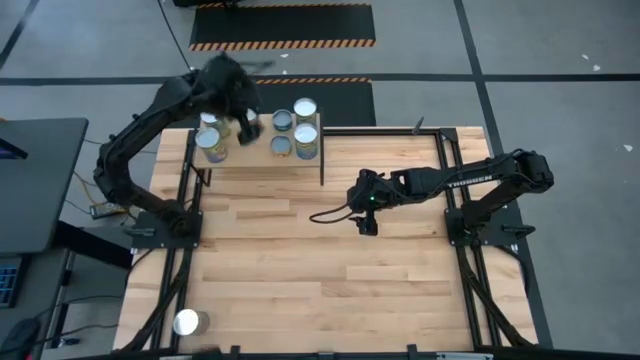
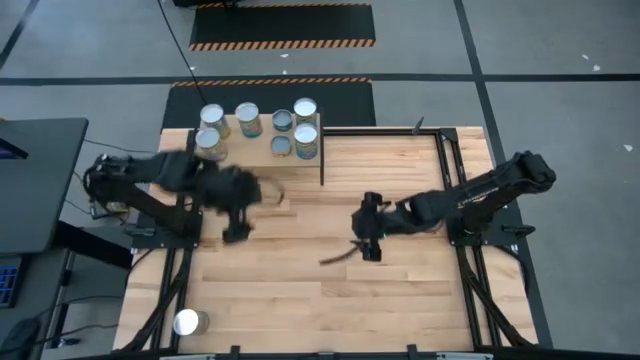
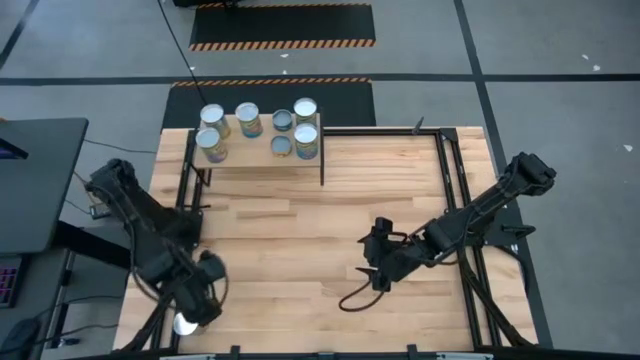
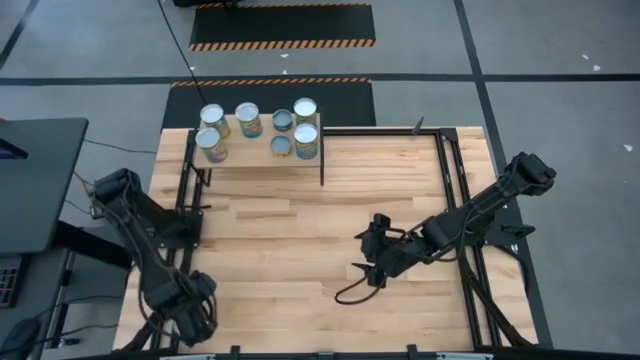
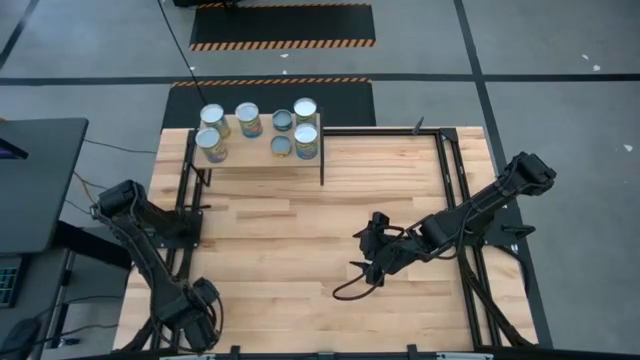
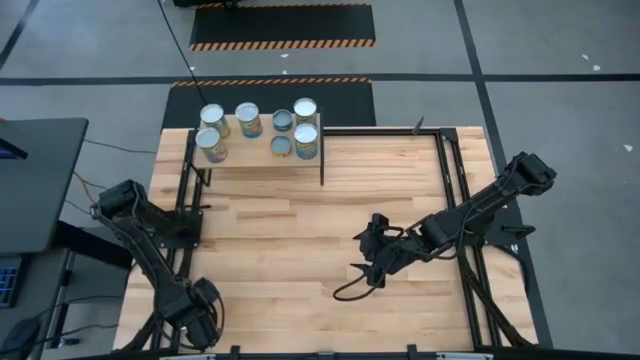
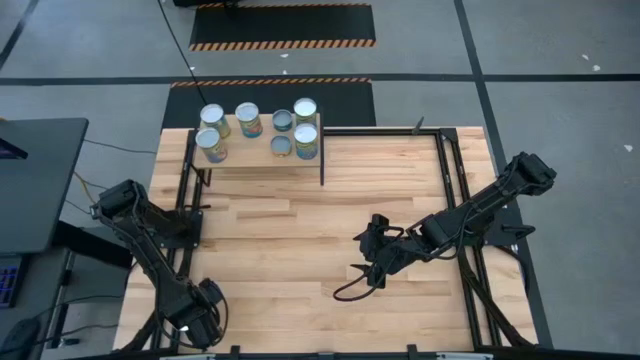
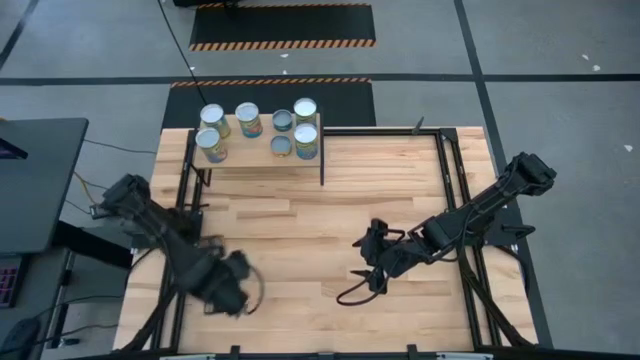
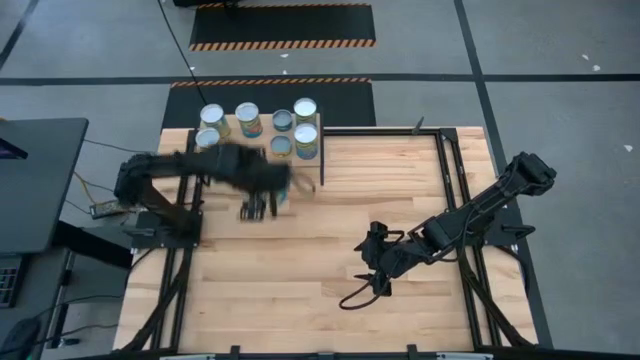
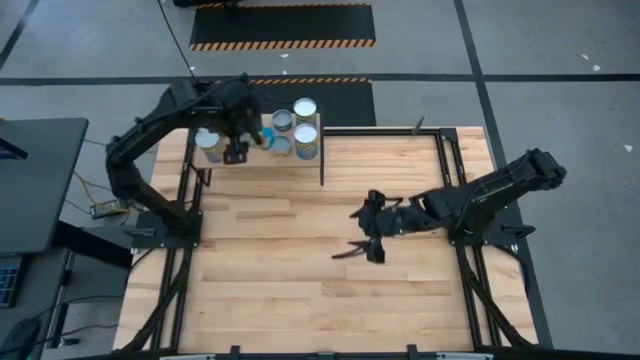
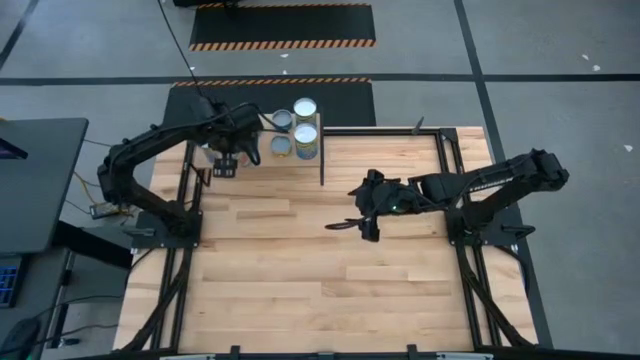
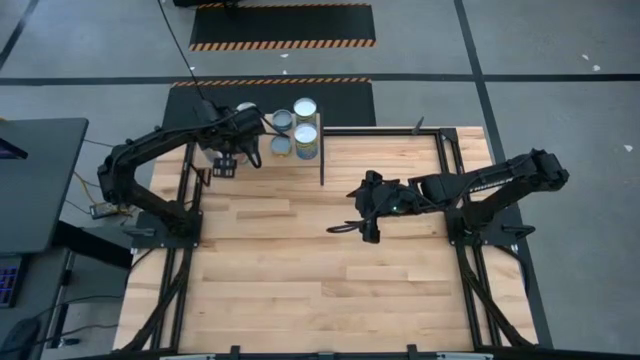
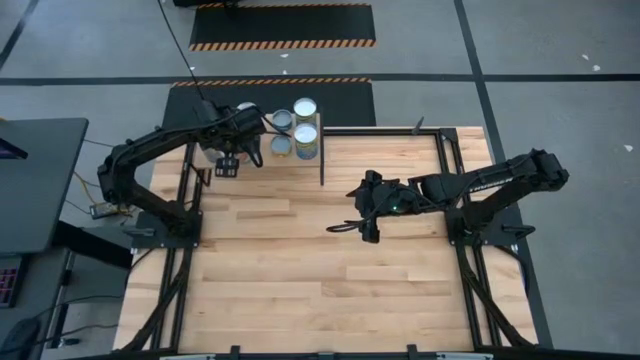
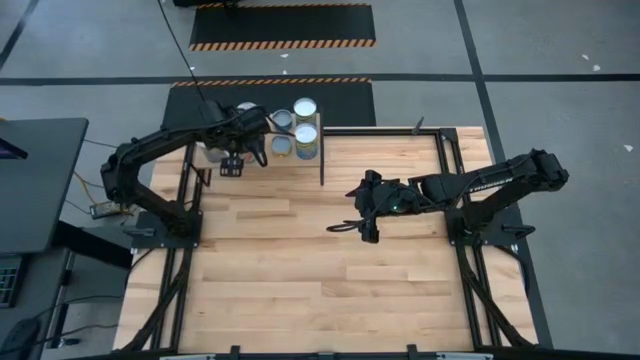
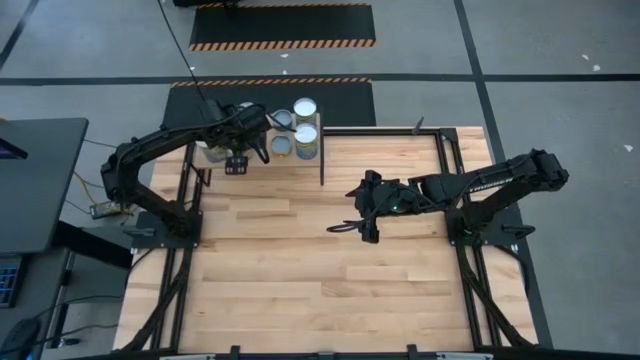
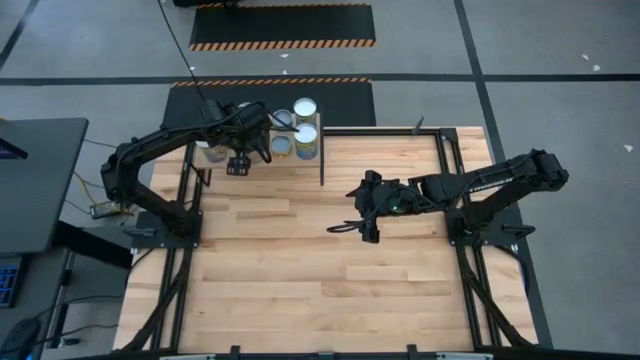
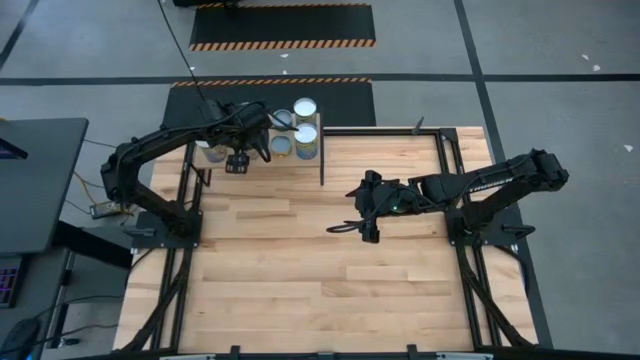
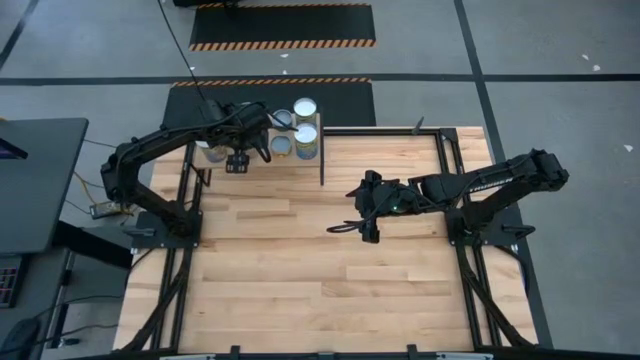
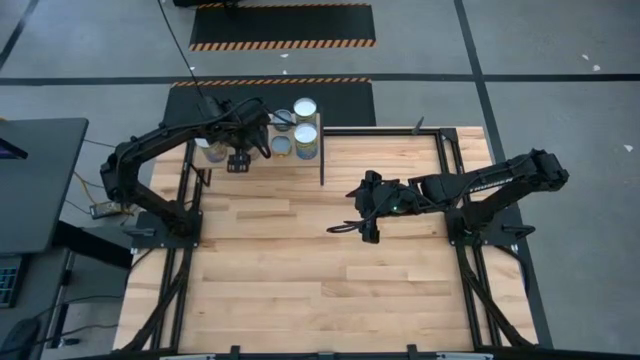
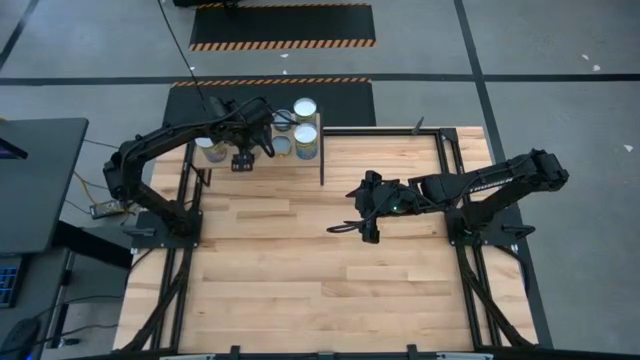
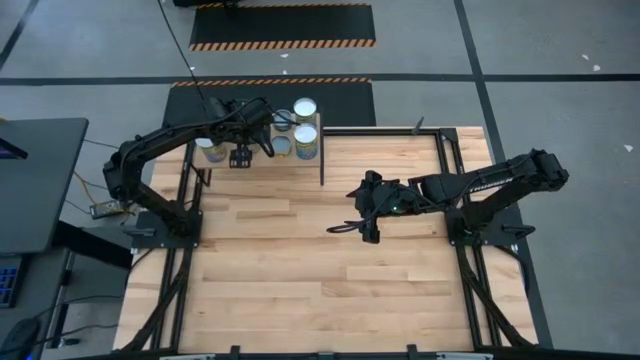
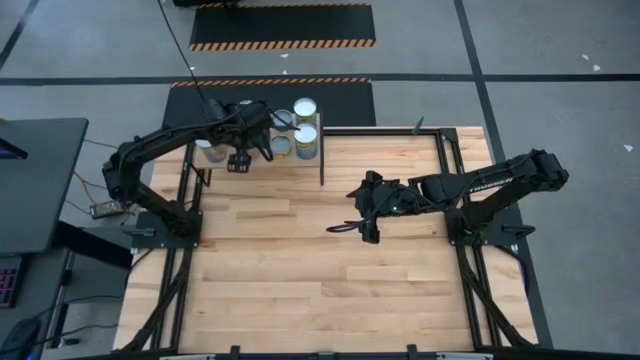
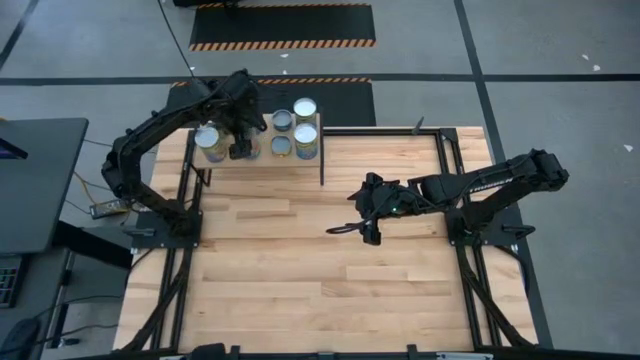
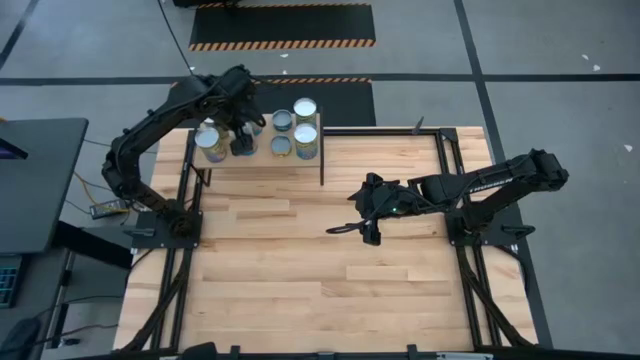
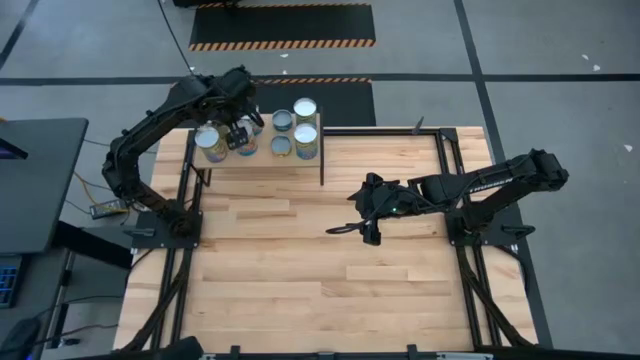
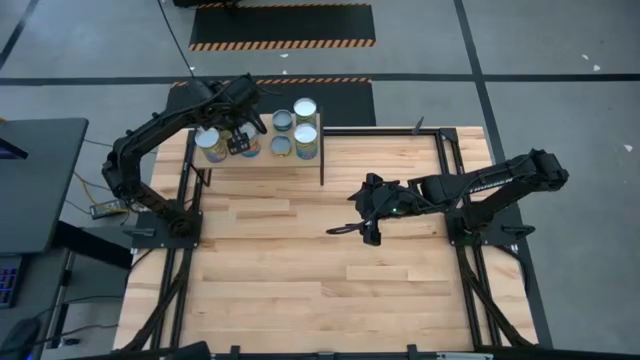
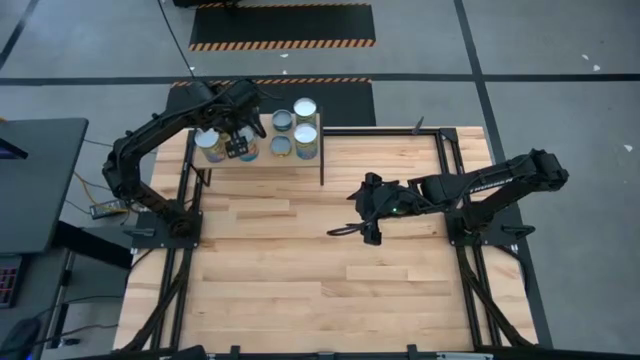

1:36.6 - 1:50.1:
Task: Pick and place cans onto a shelf
Put the canned tomatoes aligned with the other canned tomatoes on the shelf

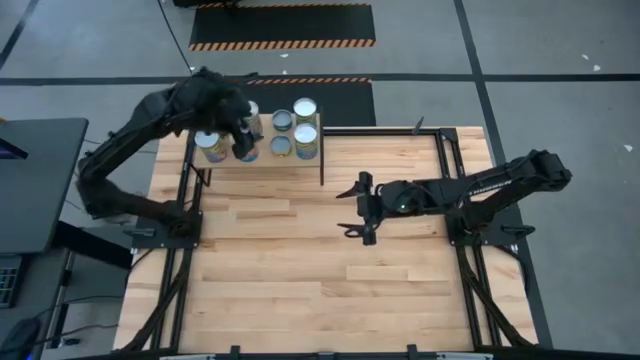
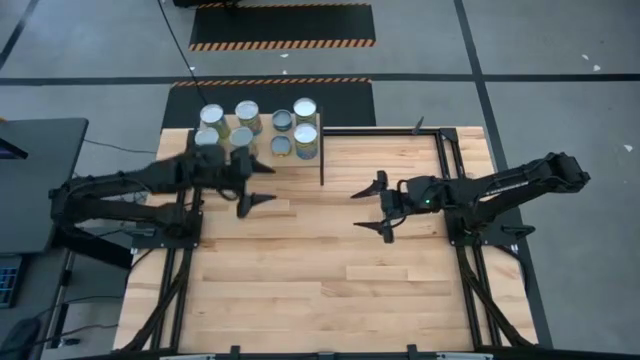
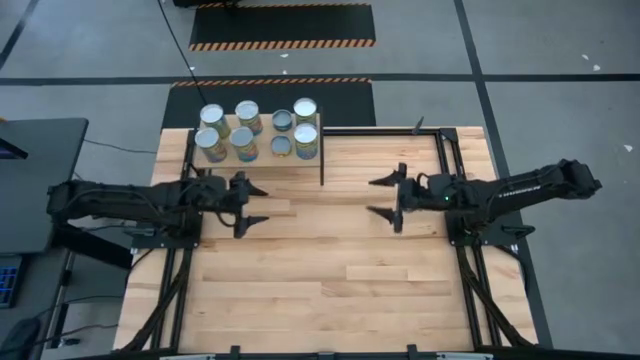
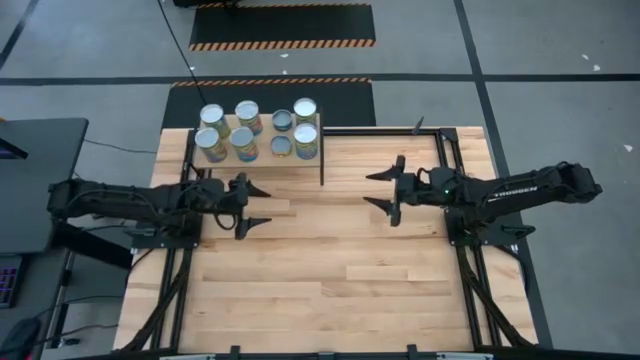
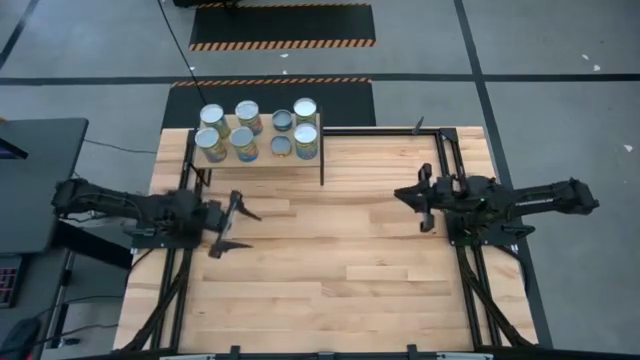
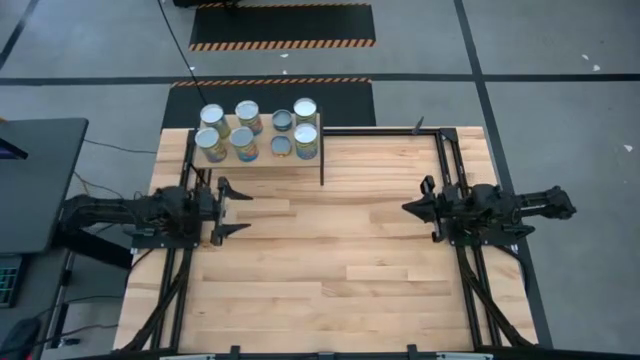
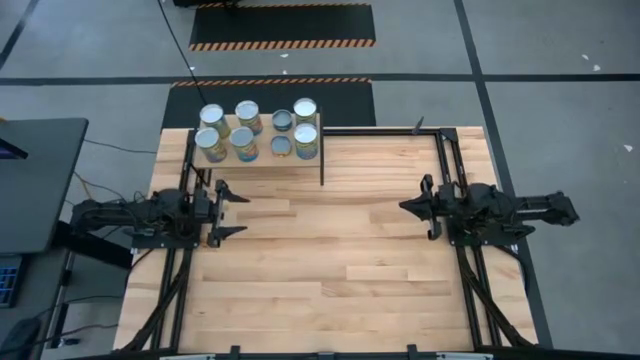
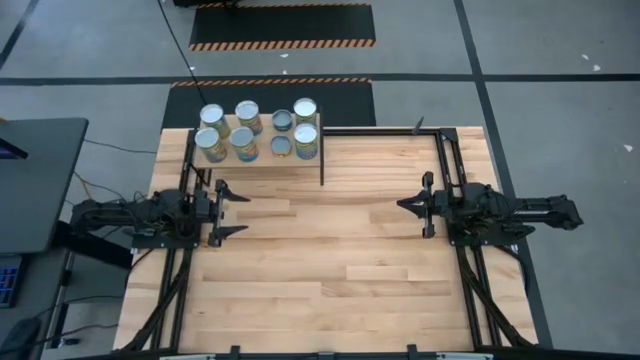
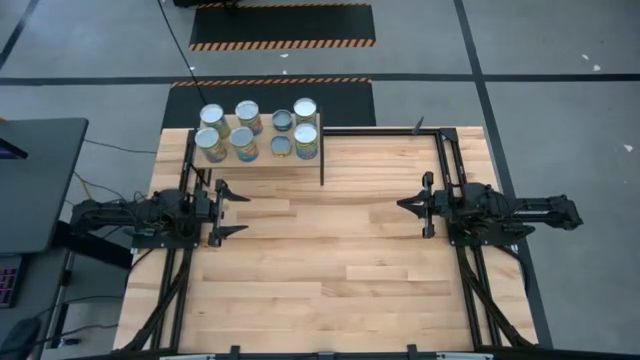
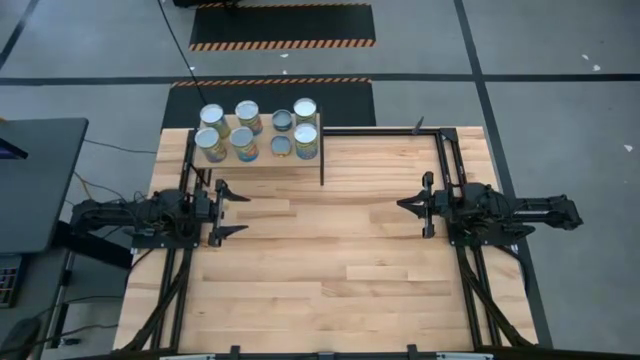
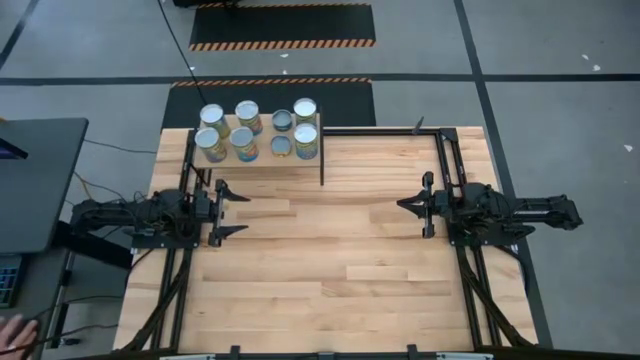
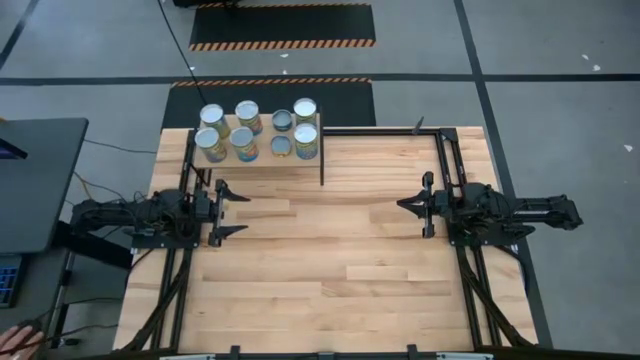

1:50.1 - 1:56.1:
Return to Home Position

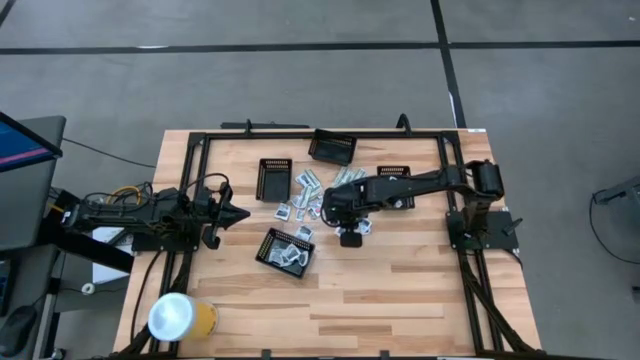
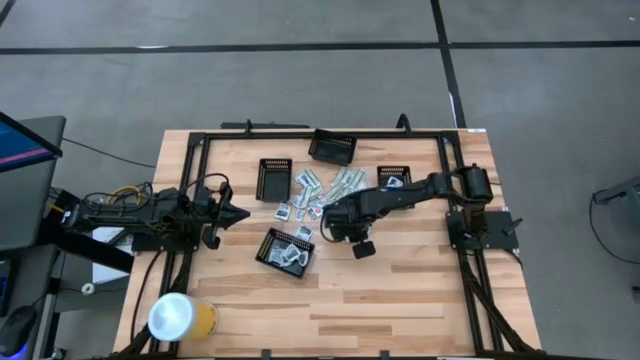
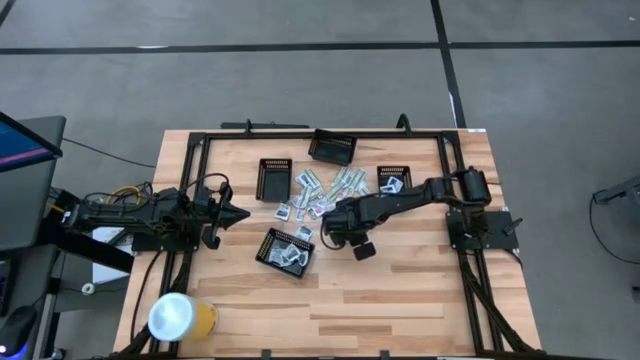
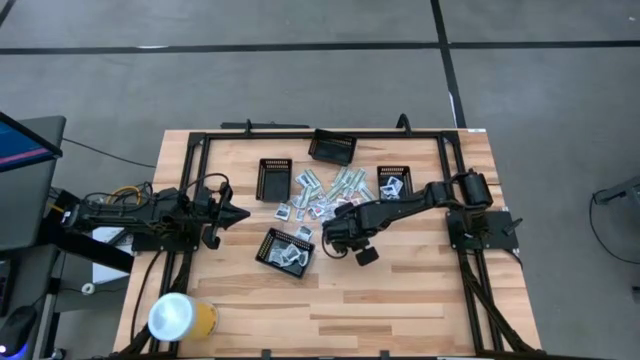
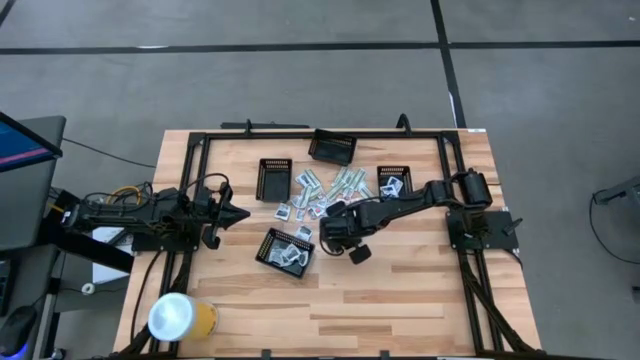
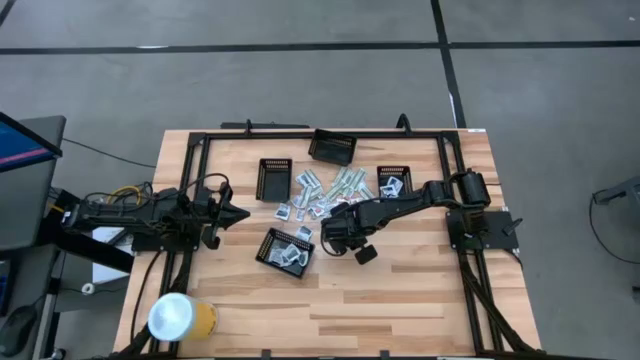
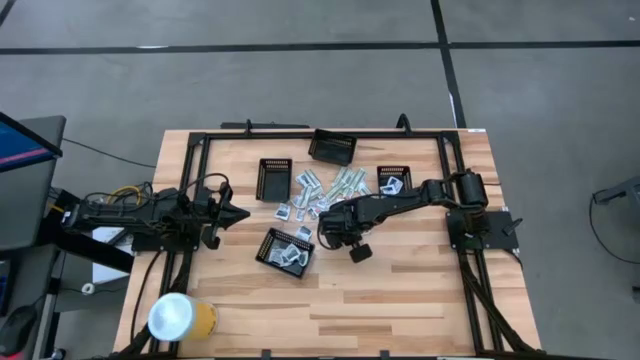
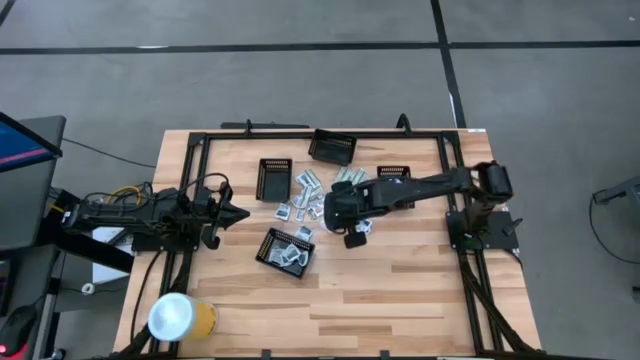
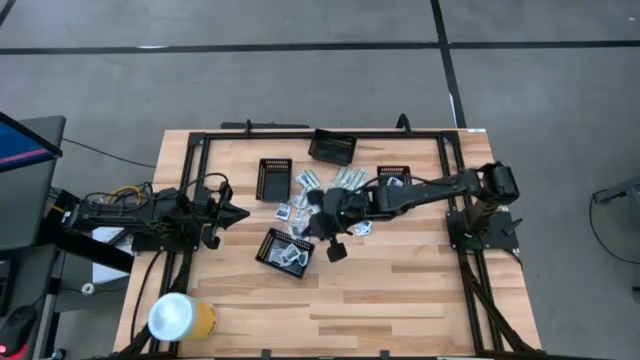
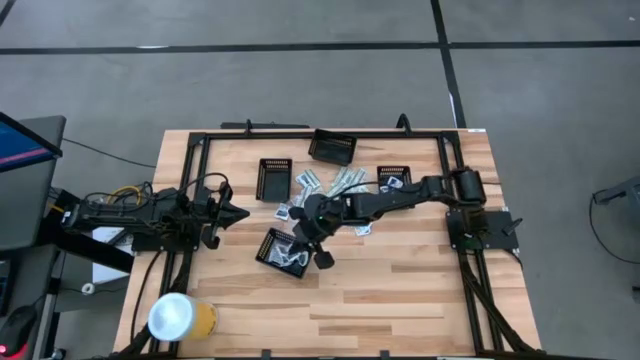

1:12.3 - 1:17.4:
Task: Pick & Place First Aid Supplies
Put the white towelette pack into the bottom black bin
